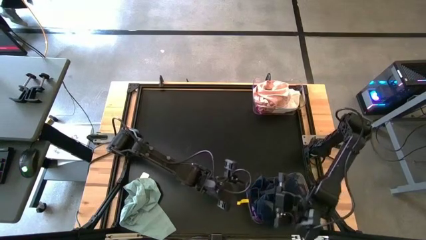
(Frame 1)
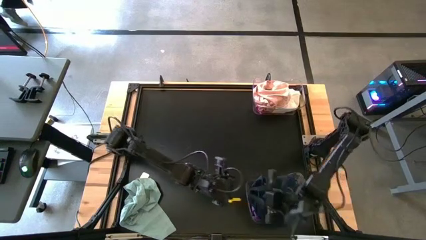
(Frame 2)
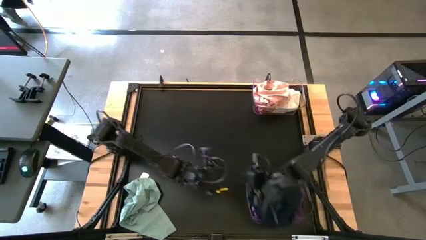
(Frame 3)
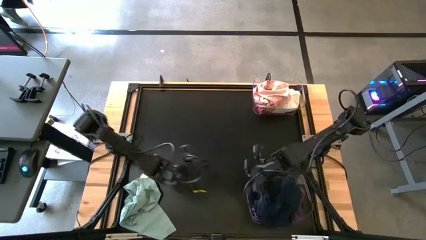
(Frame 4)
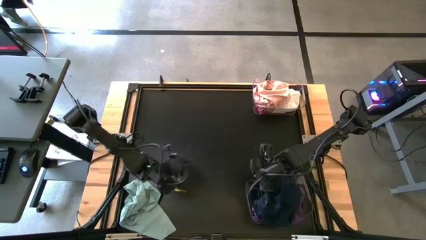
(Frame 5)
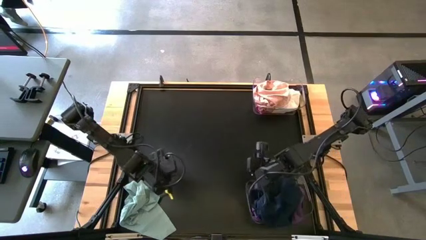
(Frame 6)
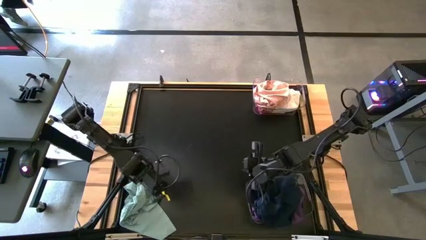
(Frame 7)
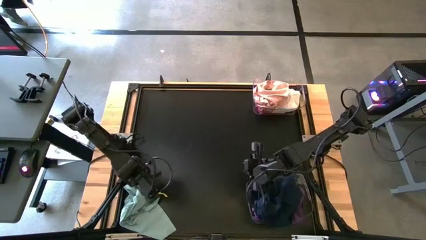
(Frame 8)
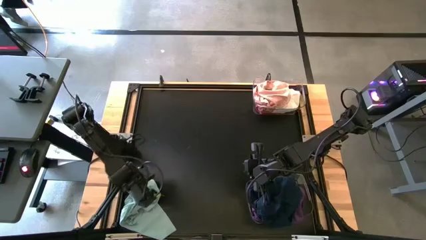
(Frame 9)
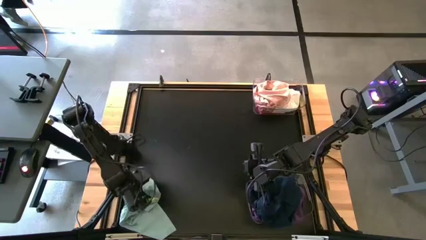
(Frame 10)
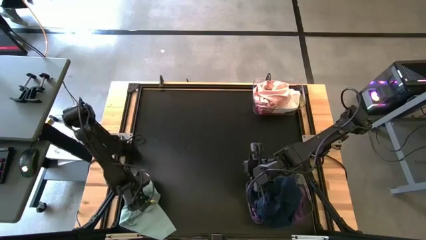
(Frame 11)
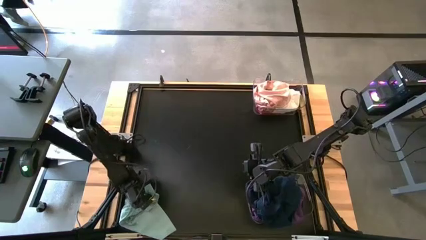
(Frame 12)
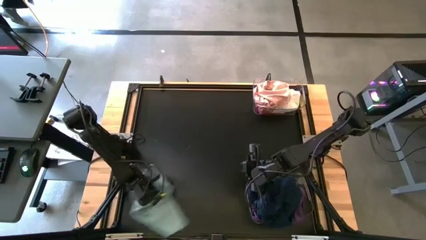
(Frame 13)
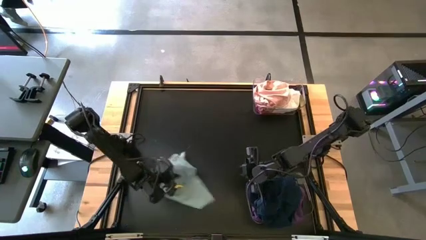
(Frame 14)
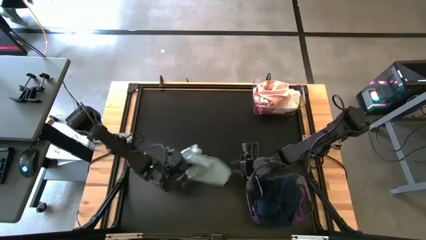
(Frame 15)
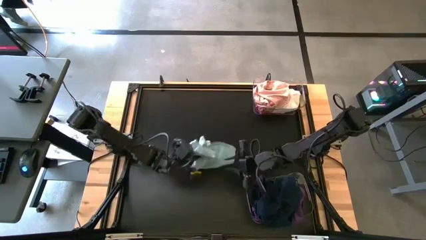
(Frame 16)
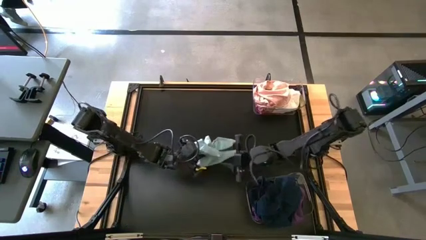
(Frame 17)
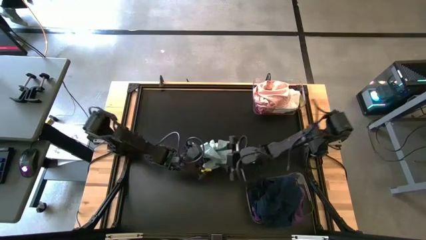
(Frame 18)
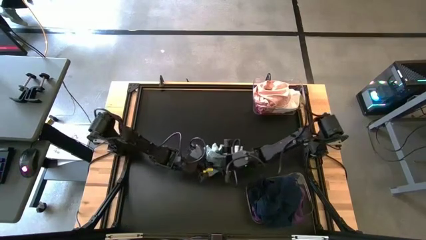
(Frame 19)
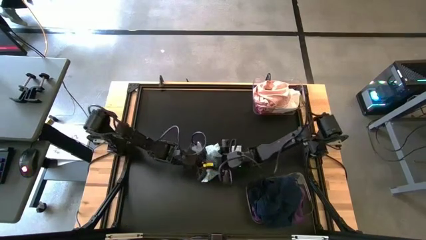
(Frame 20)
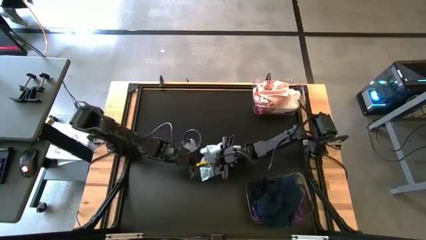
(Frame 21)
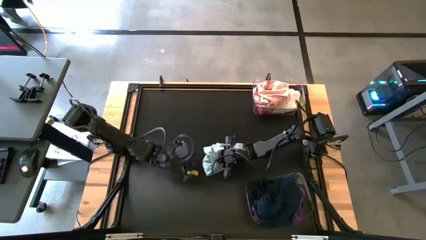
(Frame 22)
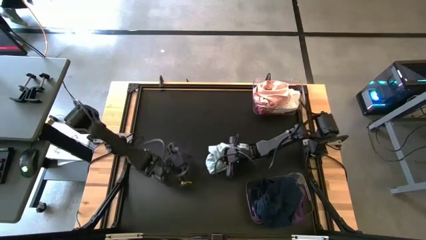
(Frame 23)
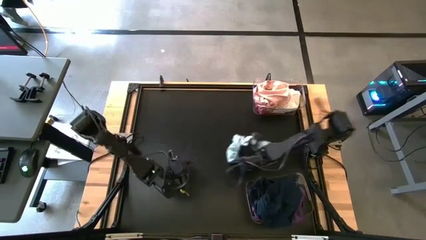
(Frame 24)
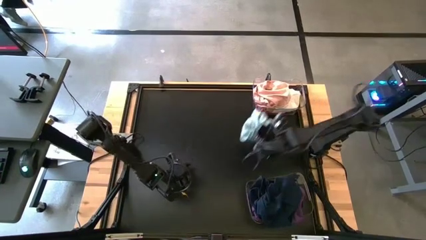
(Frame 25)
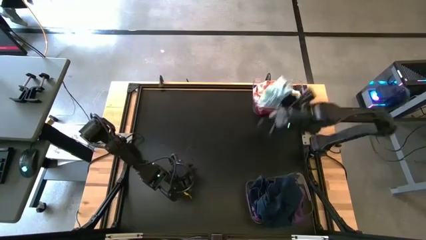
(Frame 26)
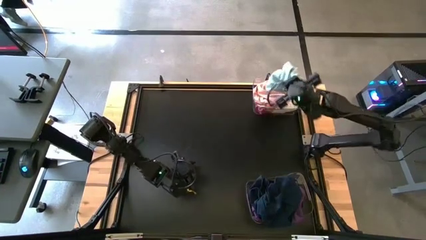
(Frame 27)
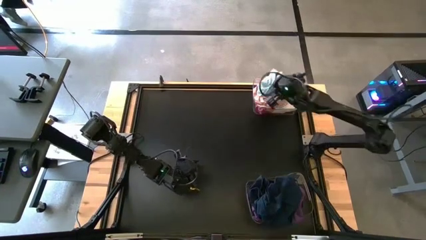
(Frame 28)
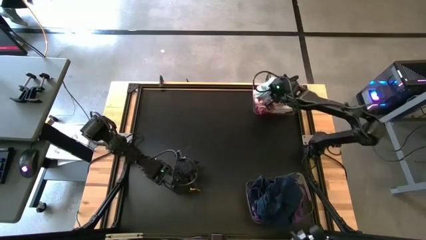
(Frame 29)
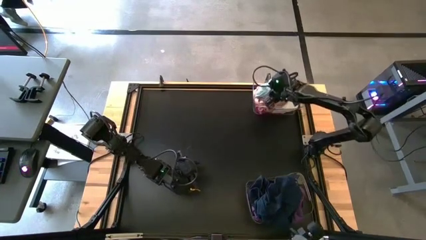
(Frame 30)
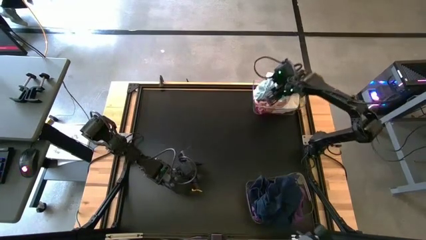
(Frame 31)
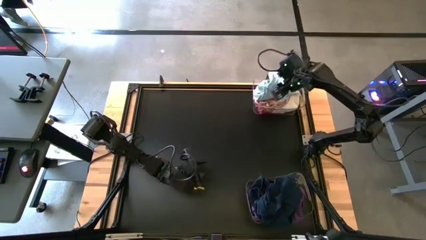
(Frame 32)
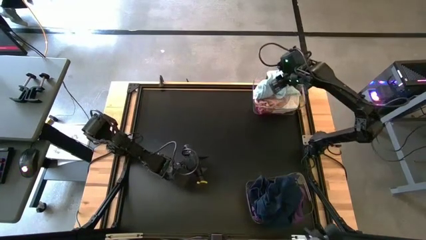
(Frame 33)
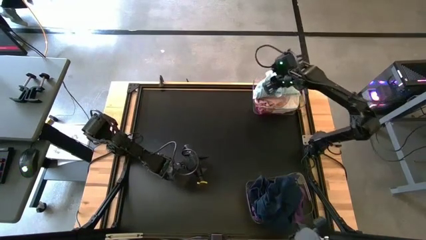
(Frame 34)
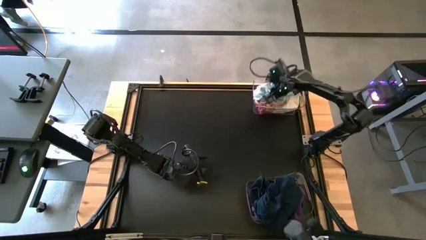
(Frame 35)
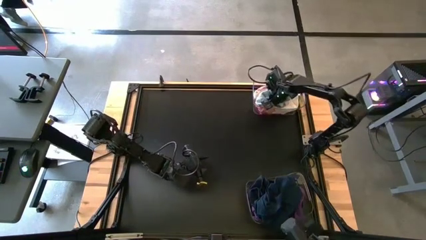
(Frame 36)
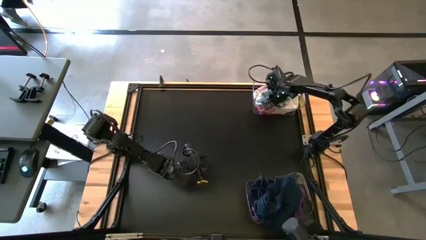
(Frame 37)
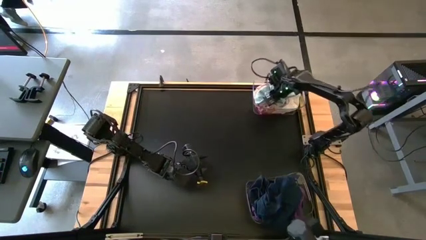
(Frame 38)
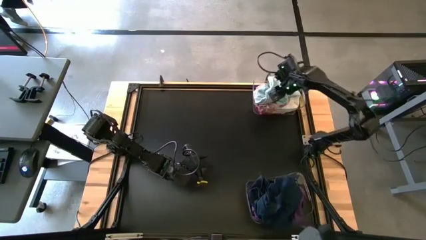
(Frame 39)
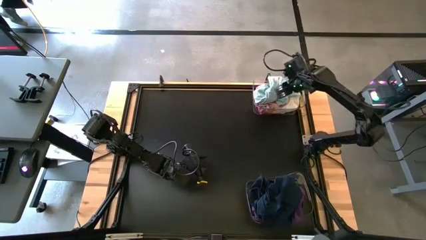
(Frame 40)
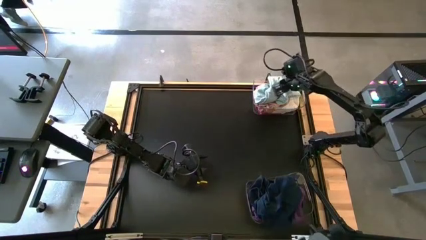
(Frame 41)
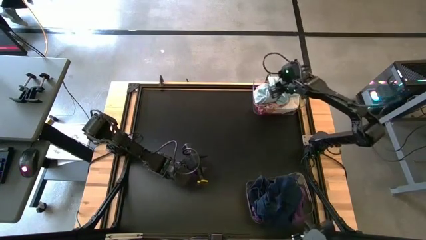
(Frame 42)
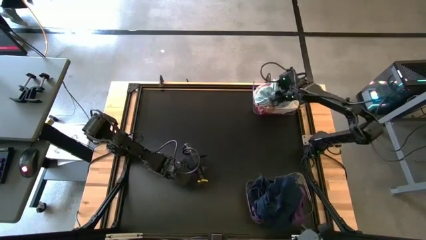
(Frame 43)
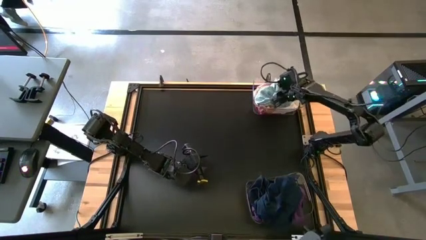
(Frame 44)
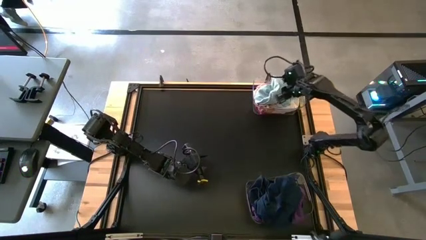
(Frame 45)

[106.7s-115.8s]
Task: Sort towels by color in basket
Put the gray towel into the top transparent bin

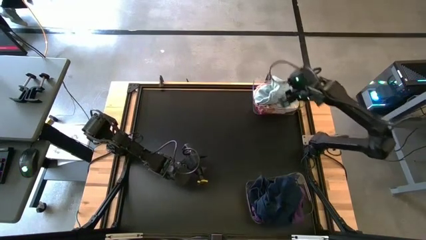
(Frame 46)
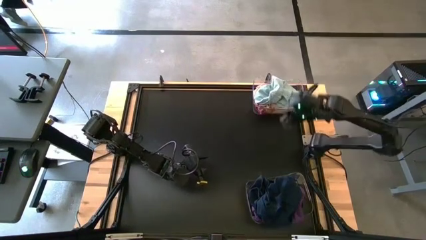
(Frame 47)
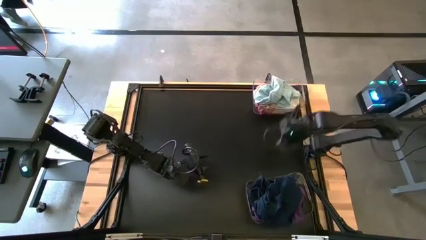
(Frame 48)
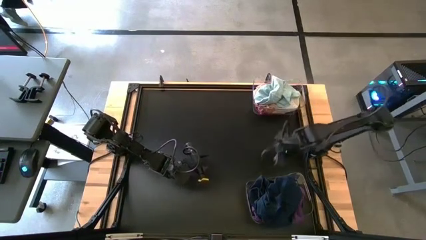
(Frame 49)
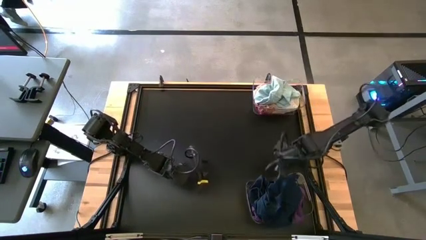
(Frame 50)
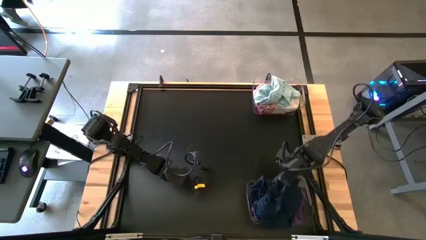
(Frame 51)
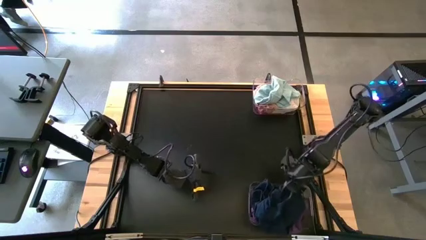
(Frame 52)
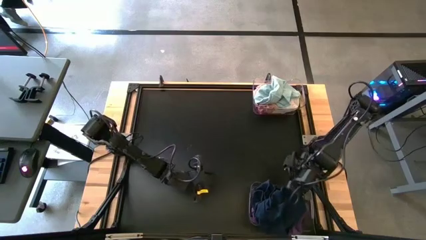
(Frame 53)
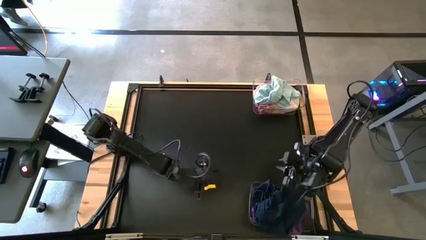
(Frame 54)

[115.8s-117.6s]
Adjust the bottom transparent bin

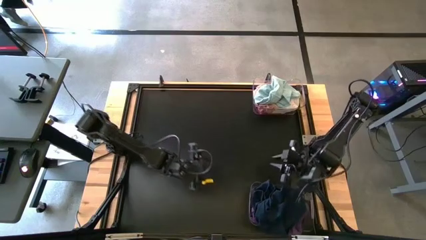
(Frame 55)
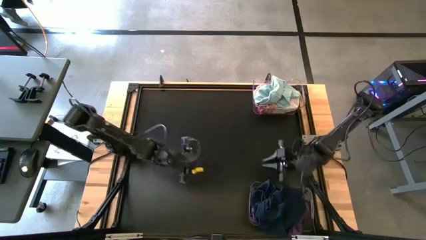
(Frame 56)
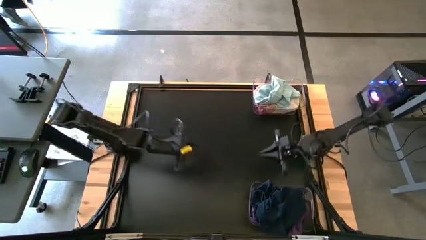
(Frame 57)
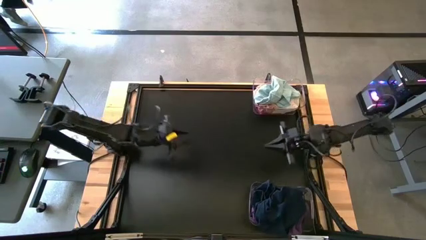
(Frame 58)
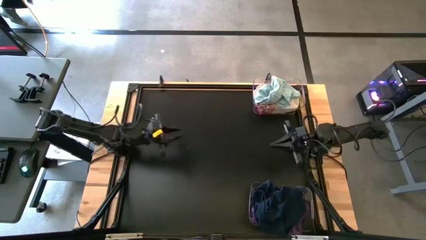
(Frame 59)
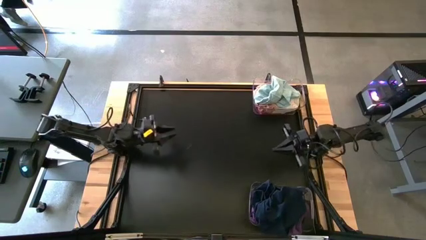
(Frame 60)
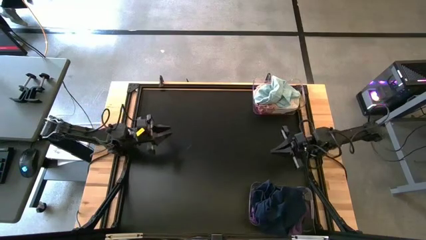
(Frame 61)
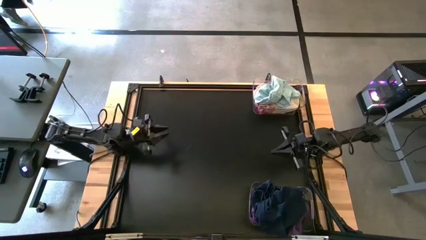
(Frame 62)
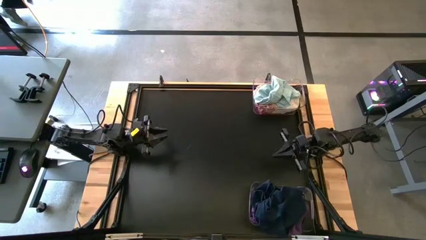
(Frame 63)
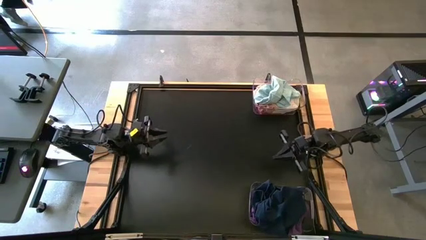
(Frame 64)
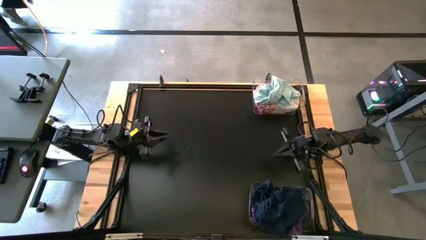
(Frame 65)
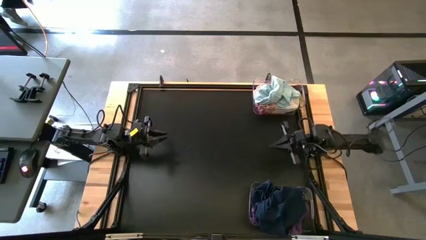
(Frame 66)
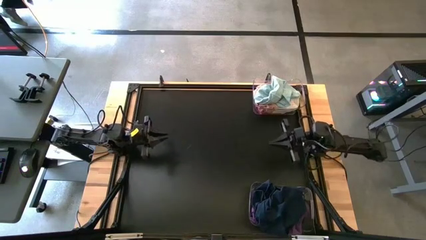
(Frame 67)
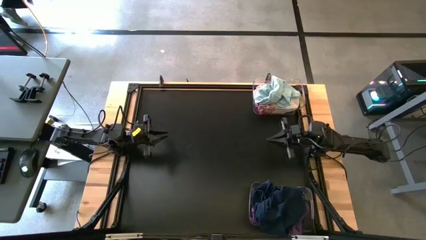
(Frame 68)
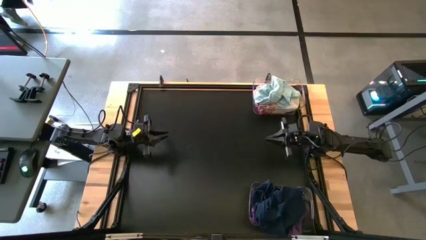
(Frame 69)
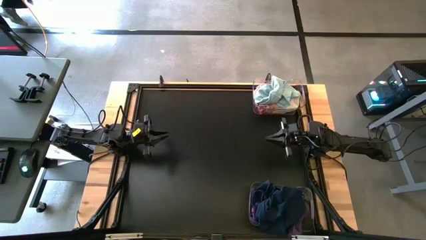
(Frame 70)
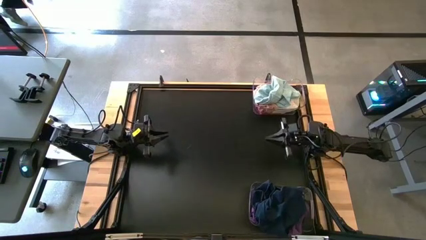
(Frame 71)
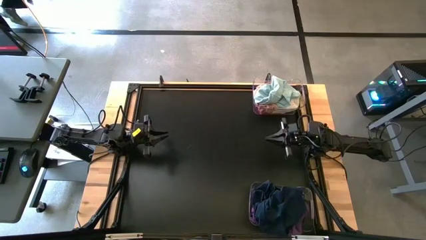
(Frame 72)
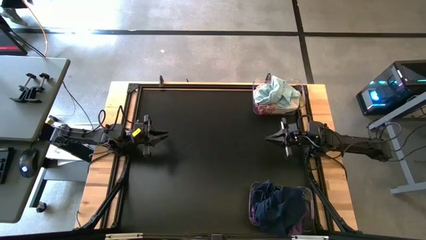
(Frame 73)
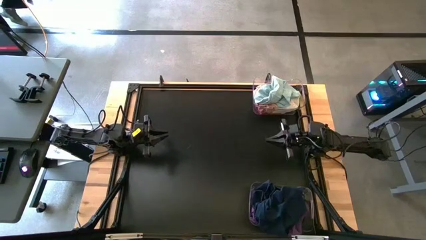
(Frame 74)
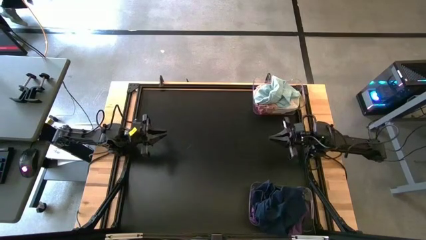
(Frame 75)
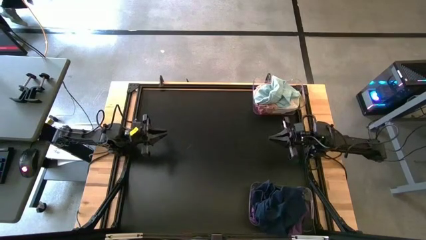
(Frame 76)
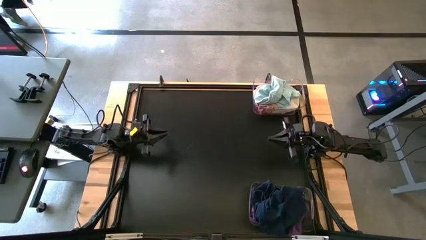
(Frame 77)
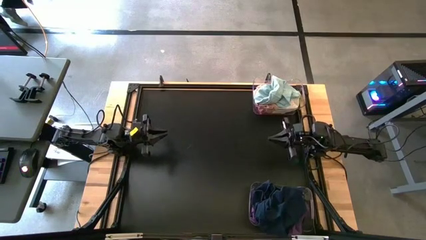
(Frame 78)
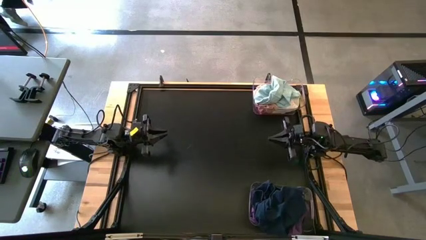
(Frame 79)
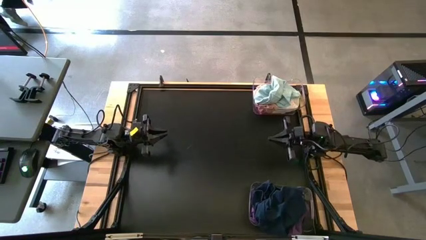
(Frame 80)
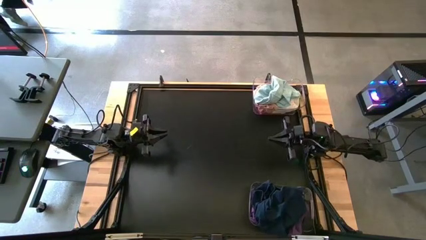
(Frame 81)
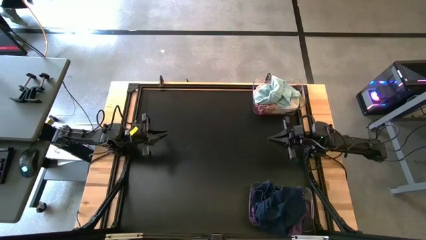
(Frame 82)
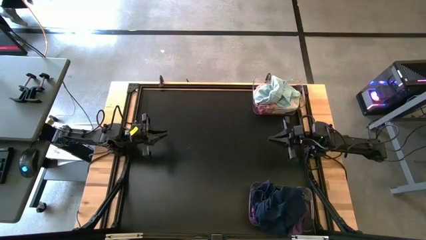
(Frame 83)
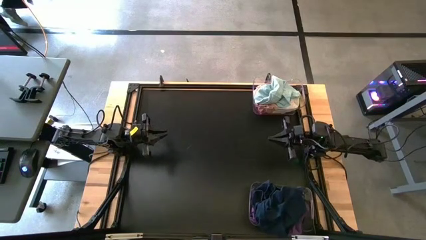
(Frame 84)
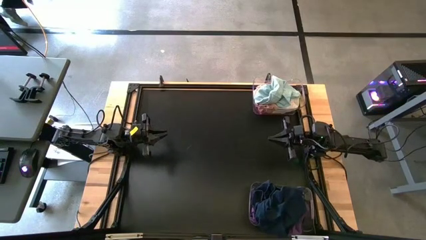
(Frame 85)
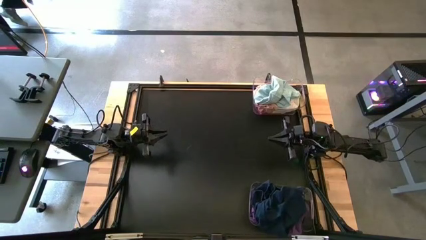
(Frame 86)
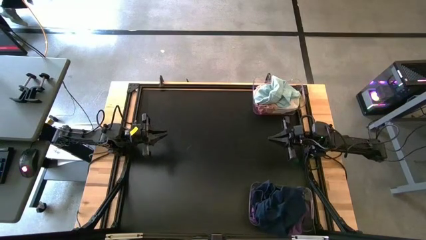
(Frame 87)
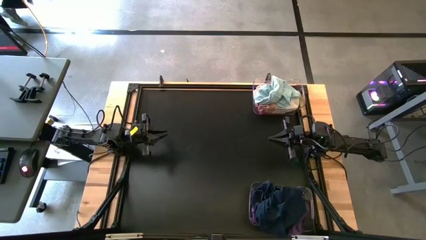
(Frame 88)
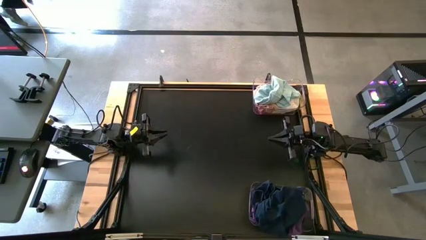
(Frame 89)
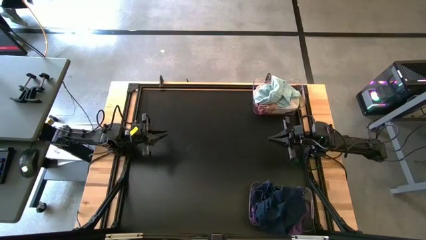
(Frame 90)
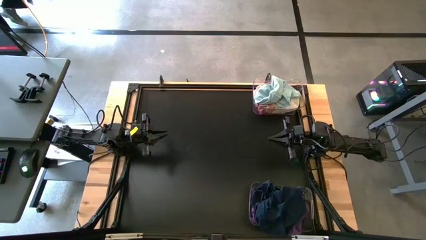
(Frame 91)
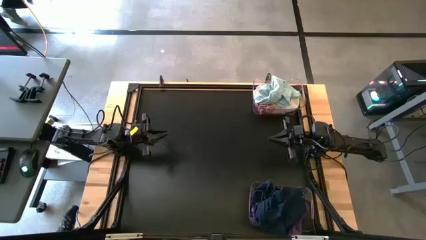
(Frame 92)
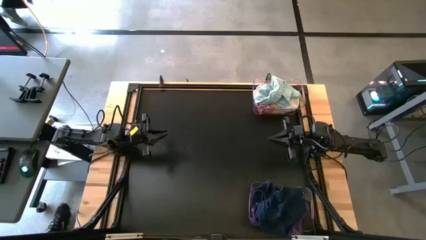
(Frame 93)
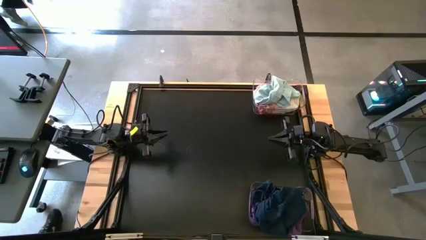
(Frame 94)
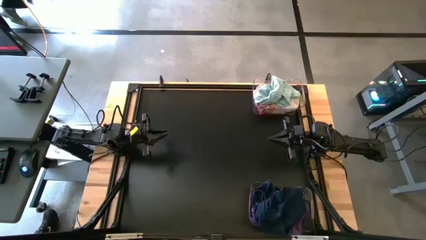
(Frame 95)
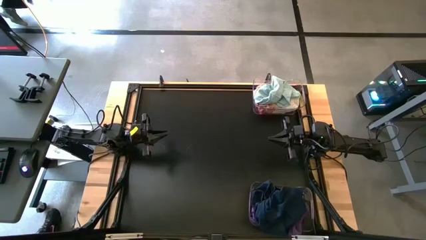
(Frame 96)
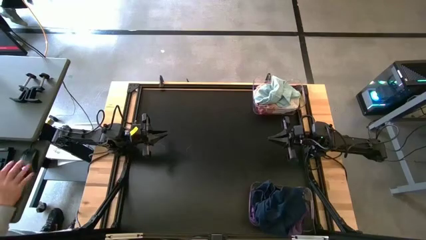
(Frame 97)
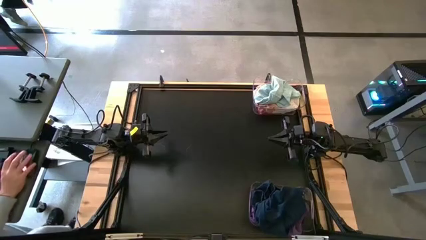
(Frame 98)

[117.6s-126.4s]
Return to Home Position
